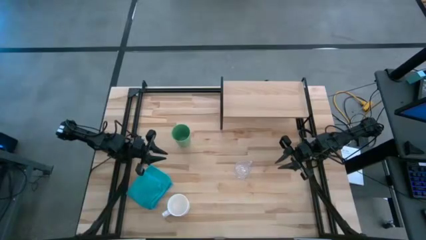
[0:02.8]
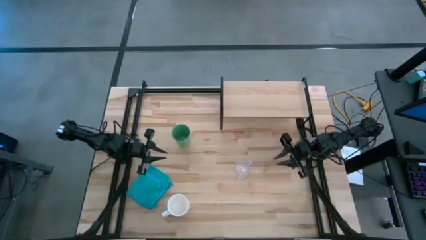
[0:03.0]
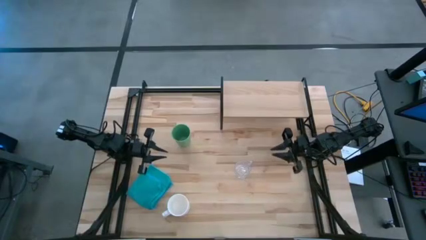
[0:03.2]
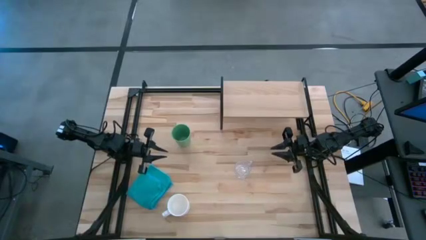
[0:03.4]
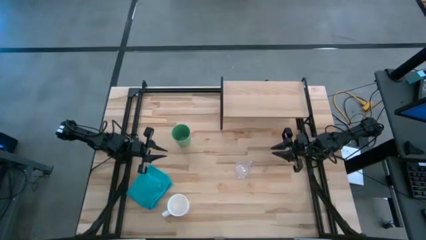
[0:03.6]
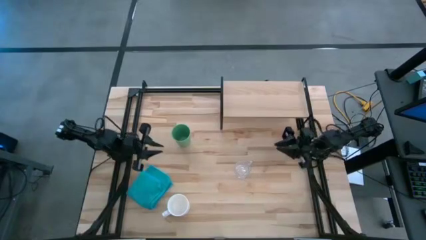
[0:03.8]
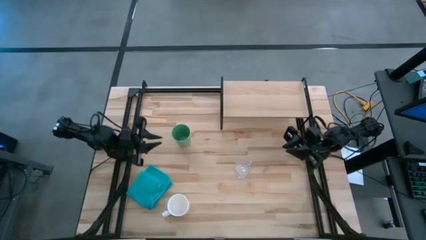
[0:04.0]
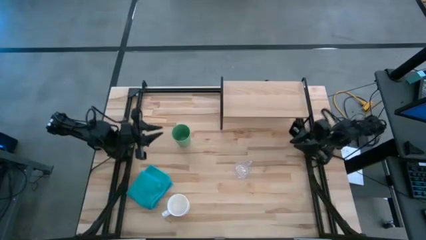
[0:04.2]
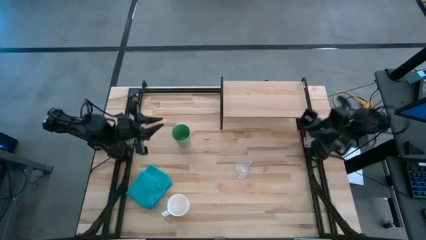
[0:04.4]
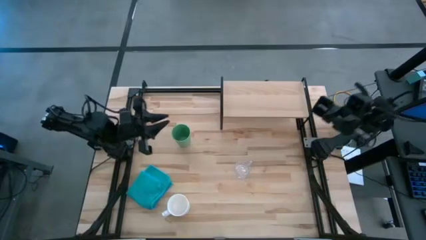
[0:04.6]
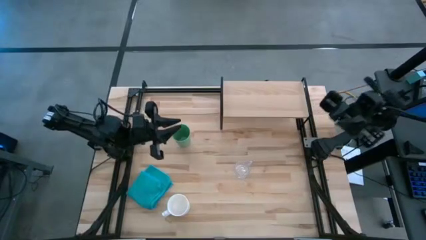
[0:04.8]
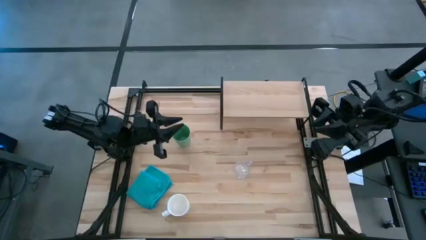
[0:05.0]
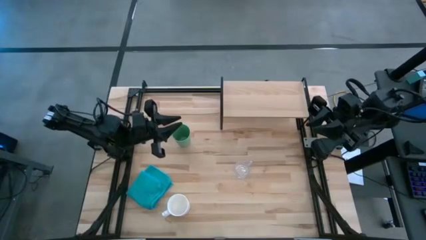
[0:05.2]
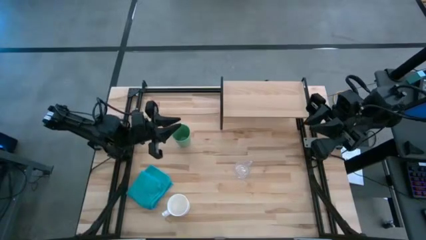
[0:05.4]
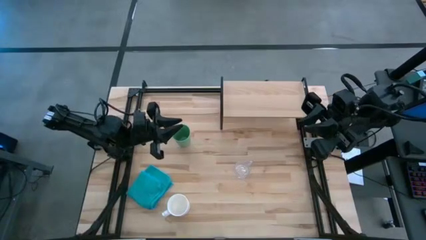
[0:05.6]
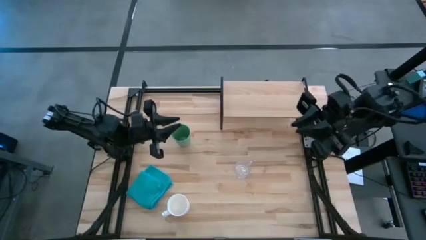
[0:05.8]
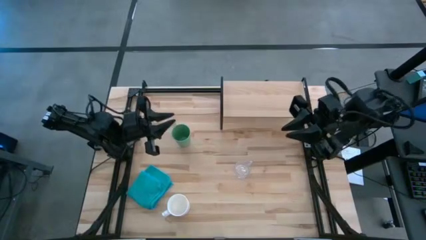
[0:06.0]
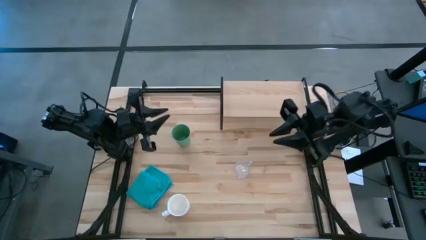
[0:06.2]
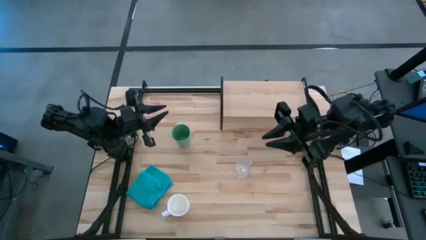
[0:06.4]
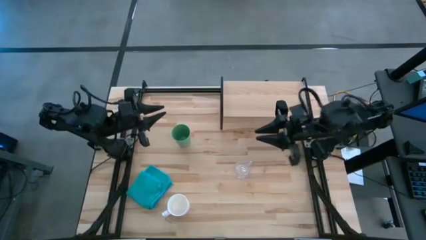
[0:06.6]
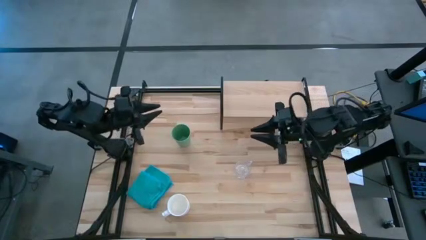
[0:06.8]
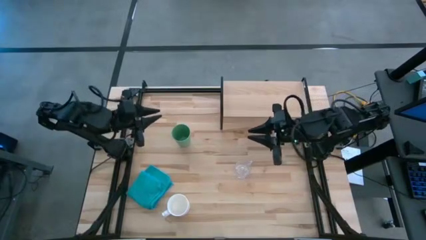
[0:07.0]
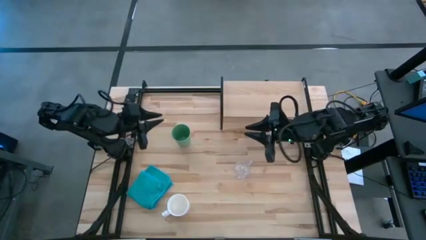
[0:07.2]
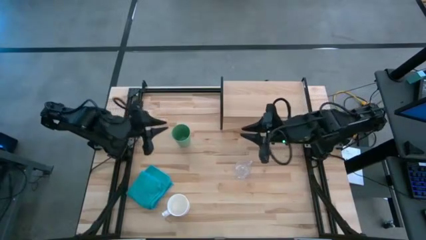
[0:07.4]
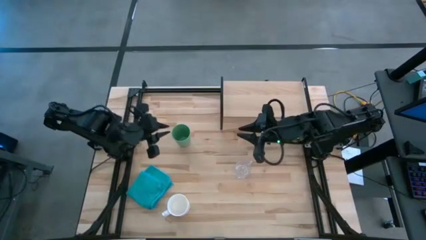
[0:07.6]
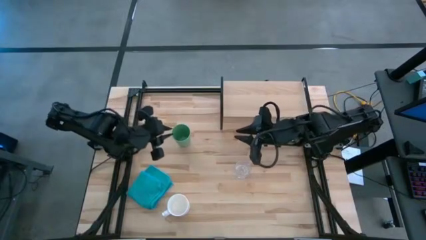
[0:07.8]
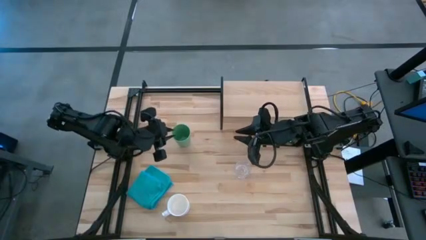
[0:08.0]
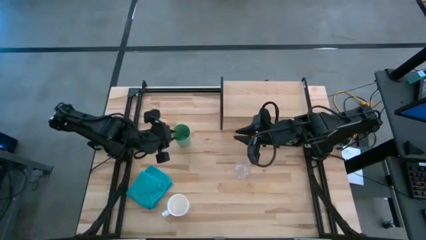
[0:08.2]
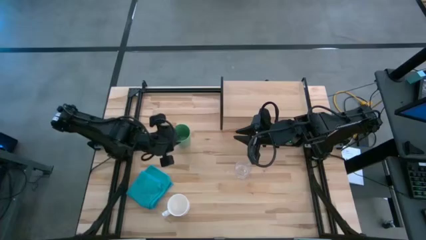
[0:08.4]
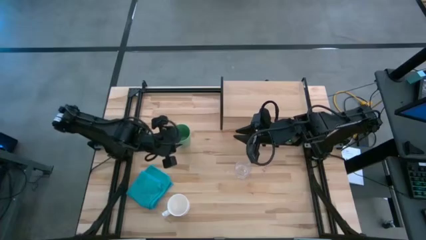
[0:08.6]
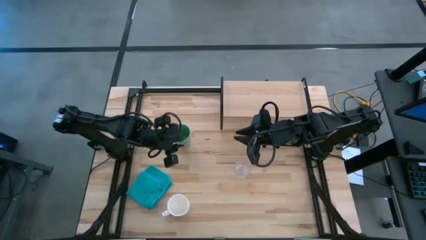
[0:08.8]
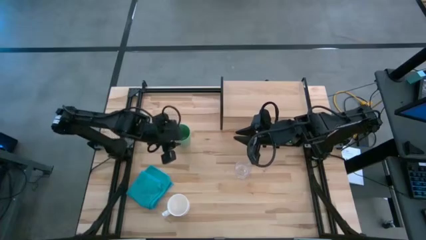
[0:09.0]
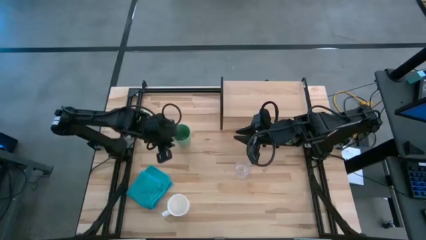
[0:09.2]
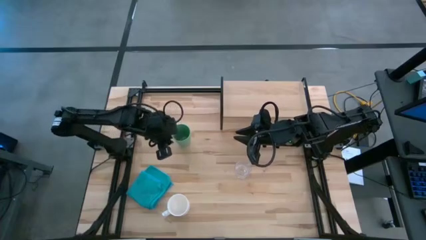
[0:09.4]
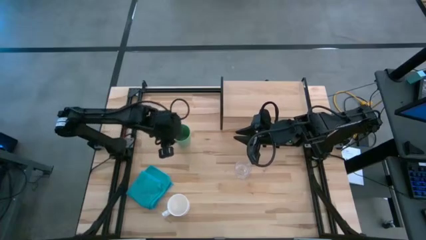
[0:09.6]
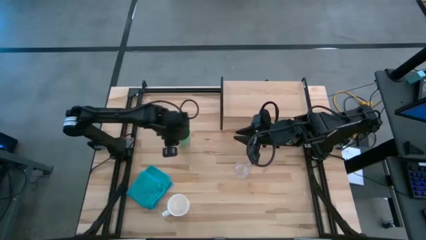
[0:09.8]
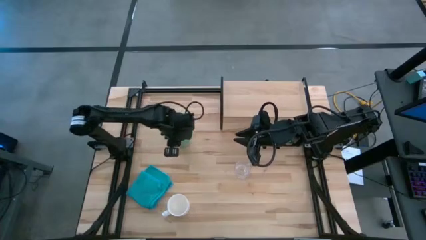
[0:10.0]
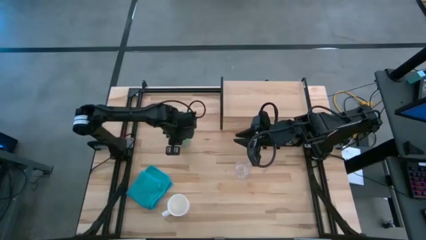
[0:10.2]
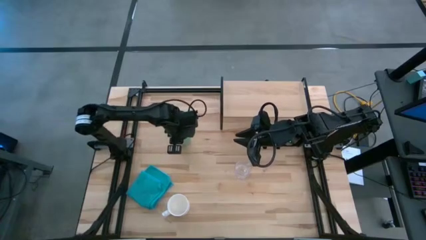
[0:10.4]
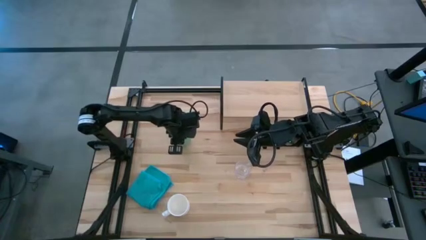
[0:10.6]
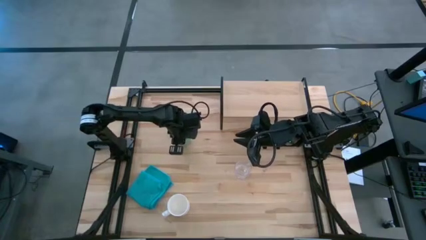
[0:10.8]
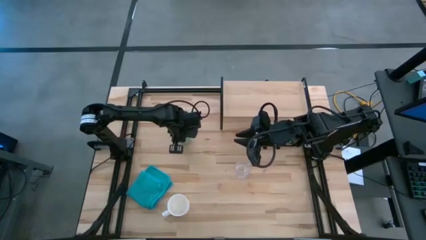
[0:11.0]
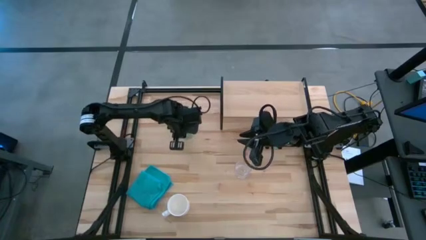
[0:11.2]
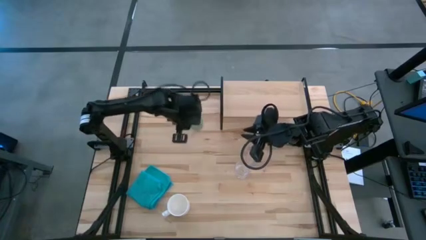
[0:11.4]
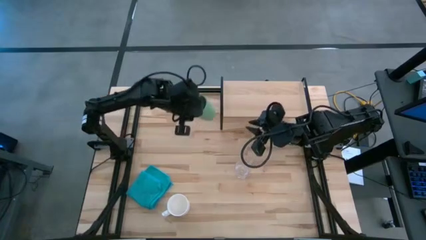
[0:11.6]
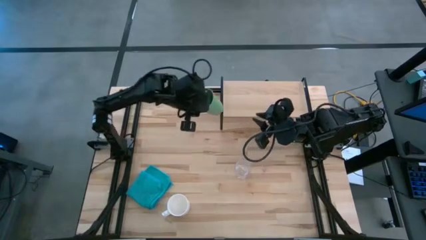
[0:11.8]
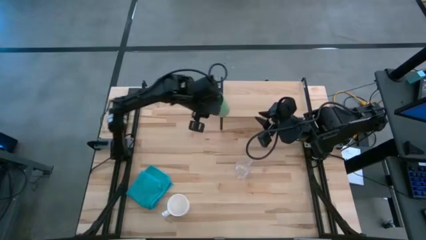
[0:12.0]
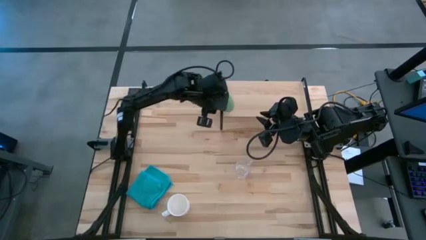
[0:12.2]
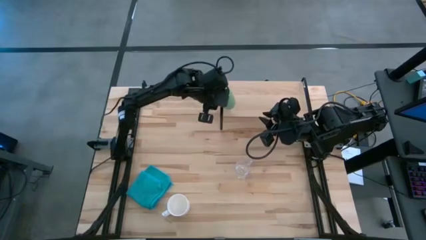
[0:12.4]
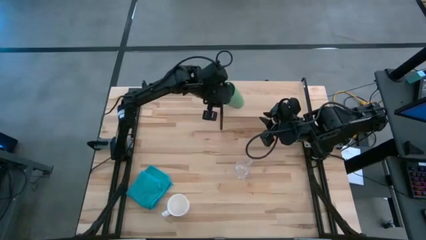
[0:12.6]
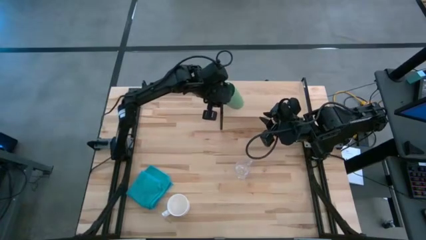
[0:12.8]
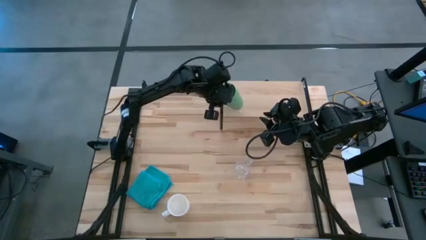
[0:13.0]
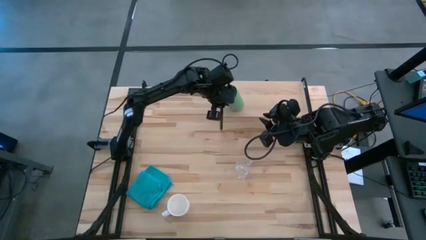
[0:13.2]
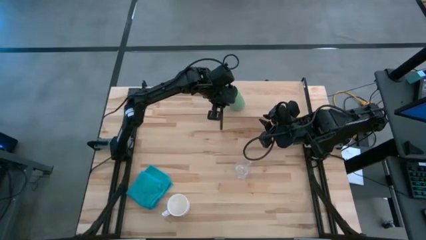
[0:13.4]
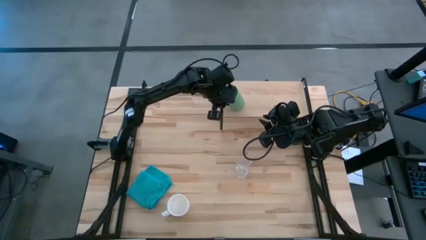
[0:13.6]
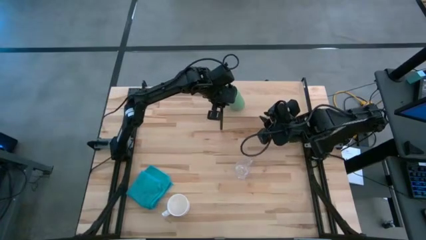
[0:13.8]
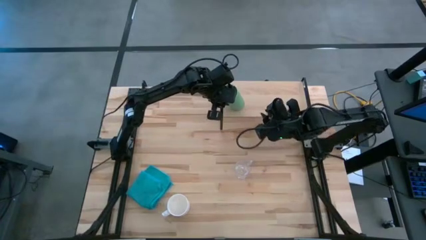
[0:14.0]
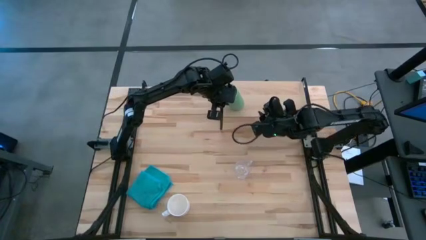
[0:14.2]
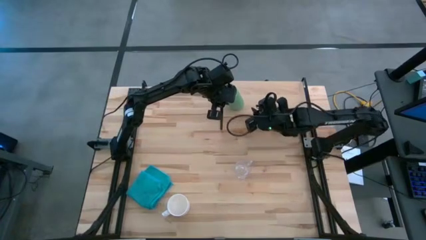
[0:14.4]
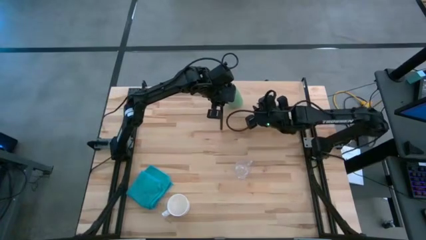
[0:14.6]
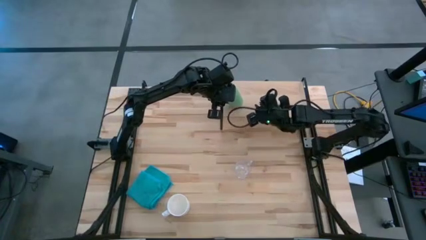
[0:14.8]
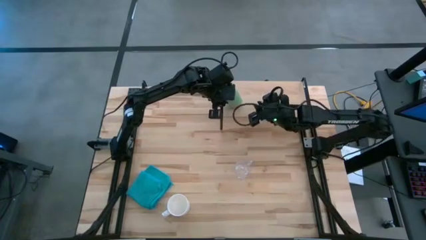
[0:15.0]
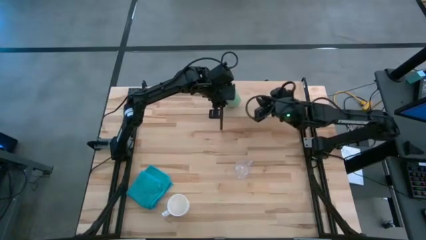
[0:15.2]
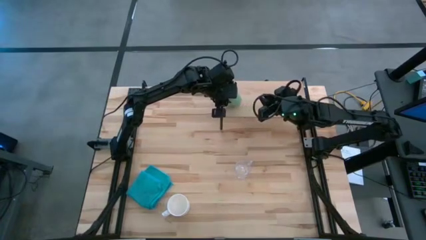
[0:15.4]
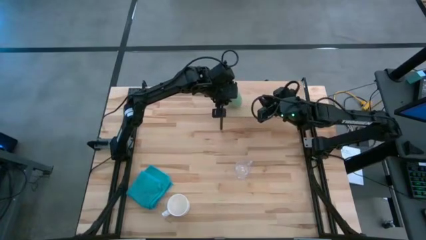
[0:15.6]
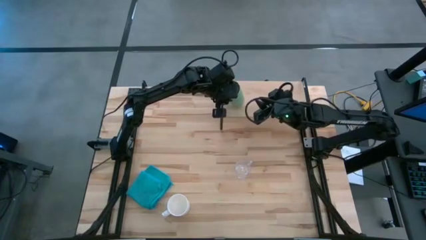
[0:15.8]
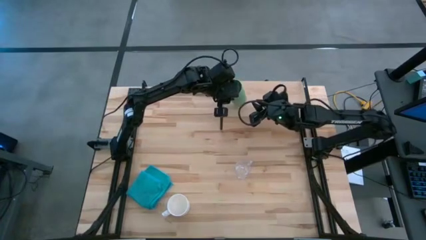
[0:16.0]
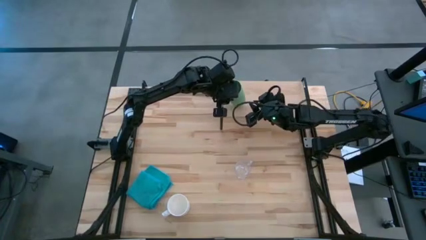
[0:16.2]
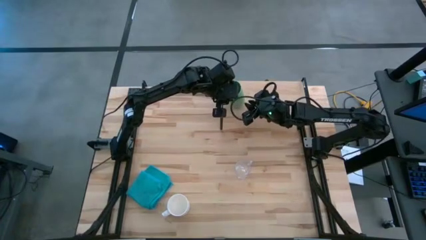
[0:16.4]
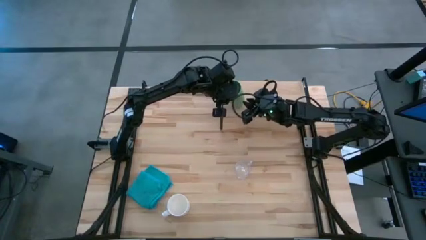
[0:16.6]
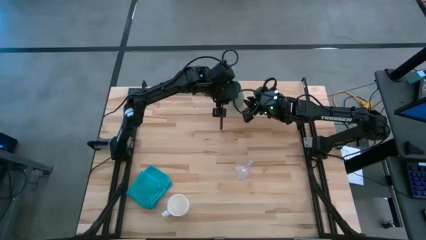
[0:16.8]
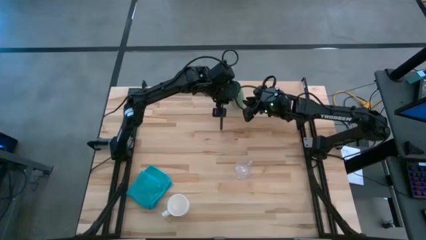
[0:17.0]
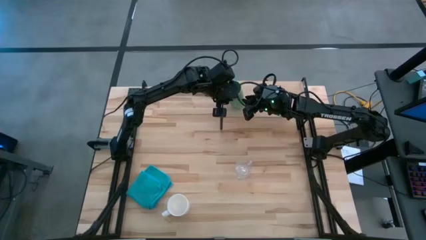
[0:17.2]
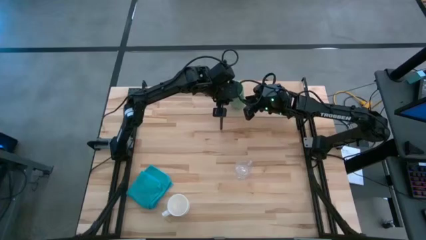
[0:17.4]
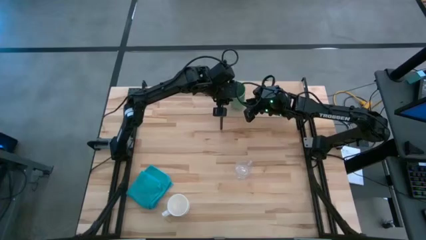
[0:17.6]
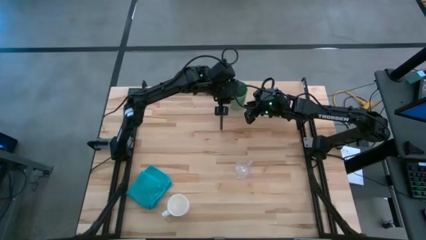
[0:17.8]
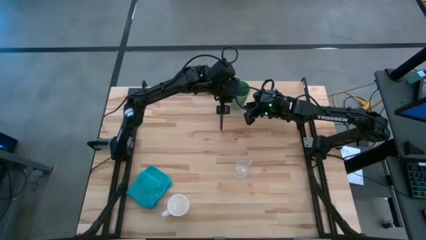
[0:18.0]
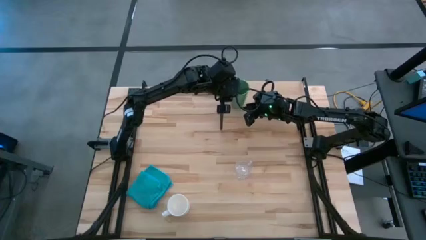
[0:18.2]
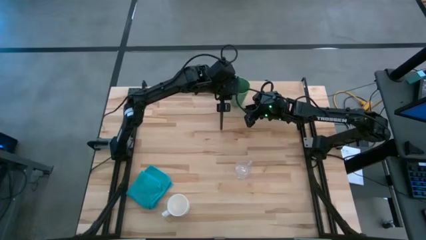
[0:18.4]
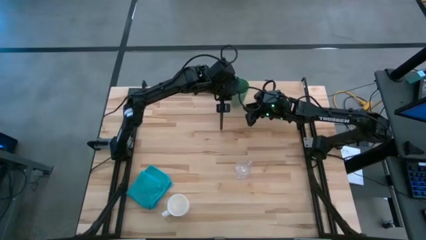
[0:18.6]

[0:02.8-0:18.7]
Task: Stack small to large cups/mugs on shelf
Put the cup on the shelf
